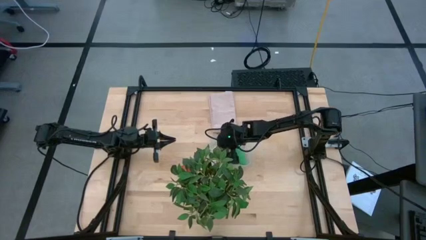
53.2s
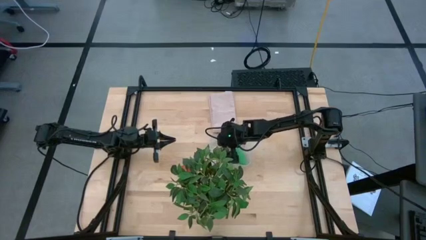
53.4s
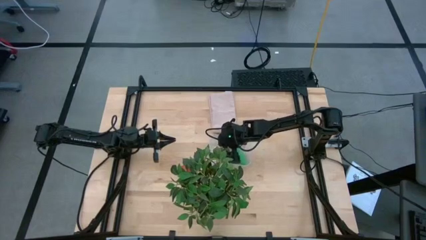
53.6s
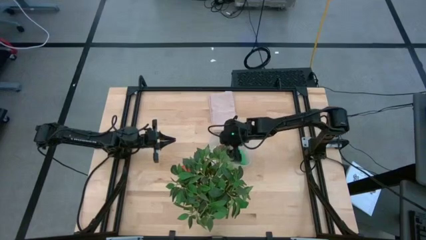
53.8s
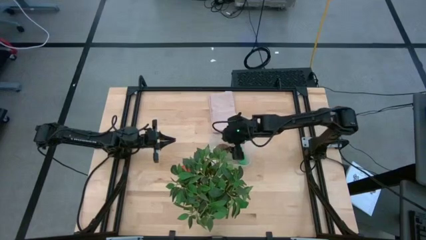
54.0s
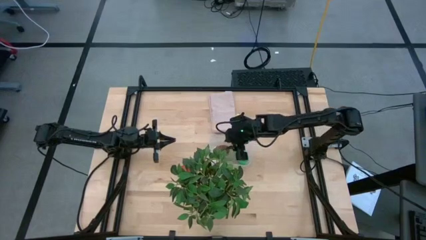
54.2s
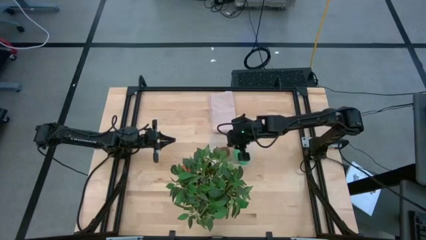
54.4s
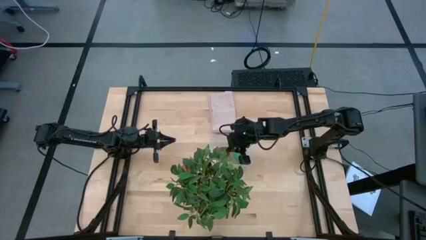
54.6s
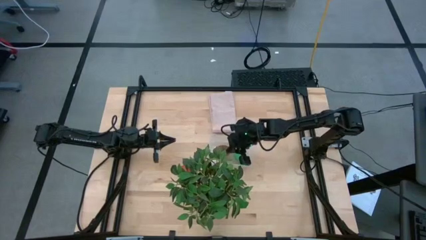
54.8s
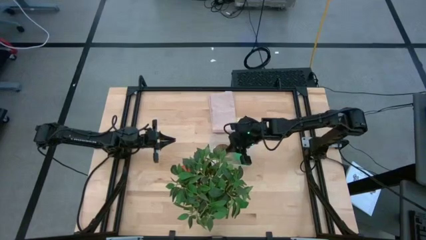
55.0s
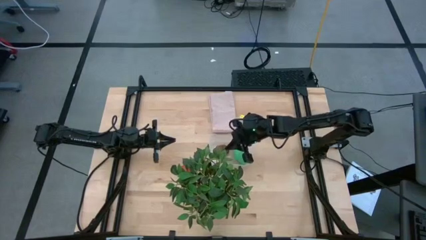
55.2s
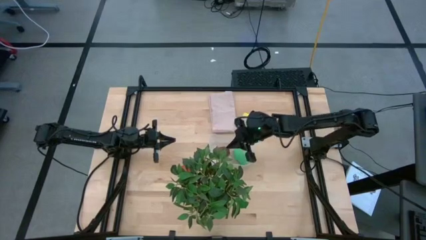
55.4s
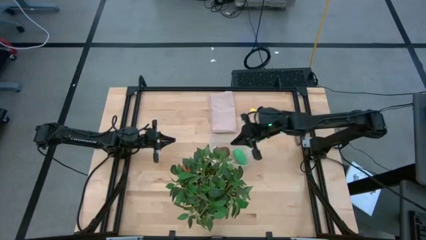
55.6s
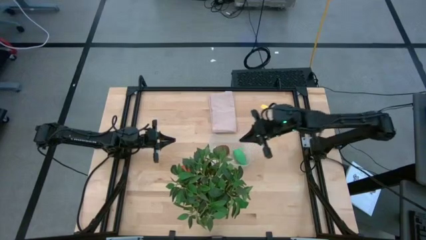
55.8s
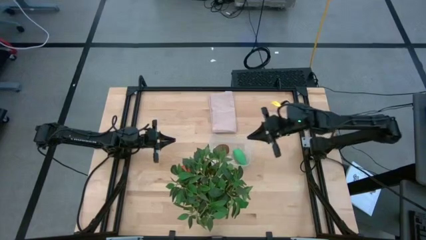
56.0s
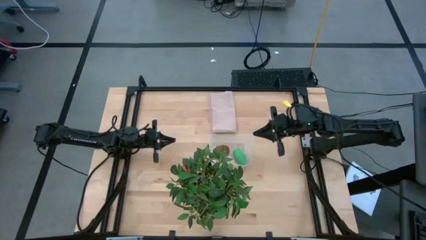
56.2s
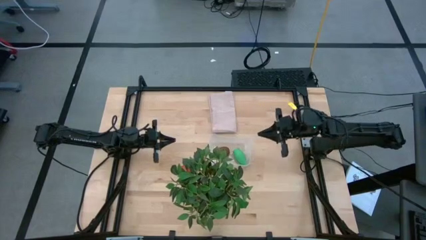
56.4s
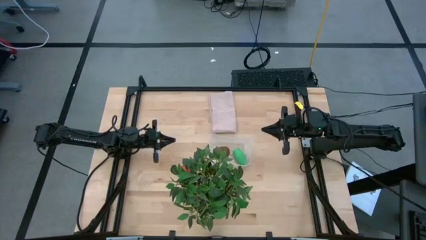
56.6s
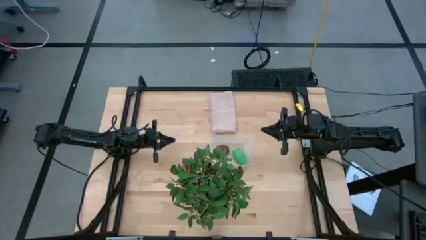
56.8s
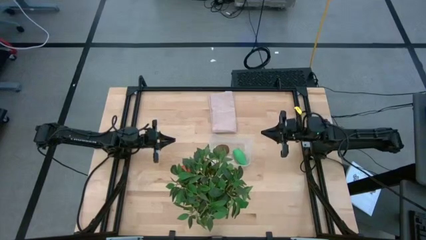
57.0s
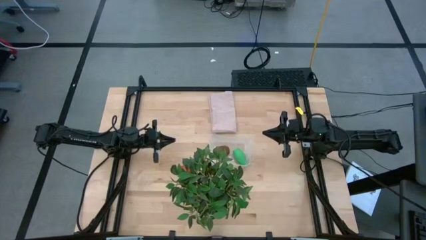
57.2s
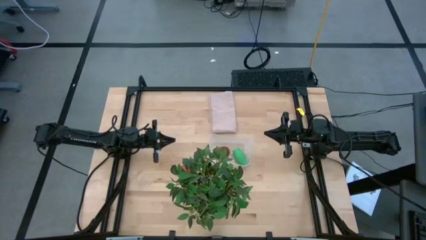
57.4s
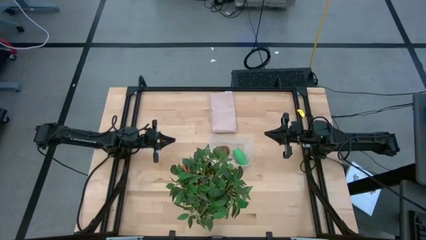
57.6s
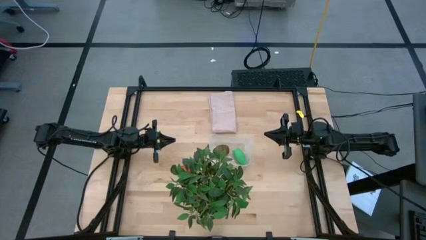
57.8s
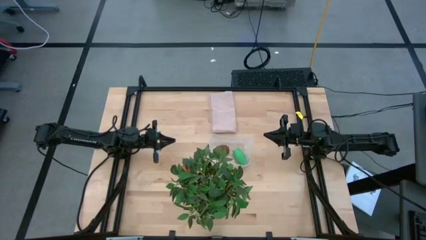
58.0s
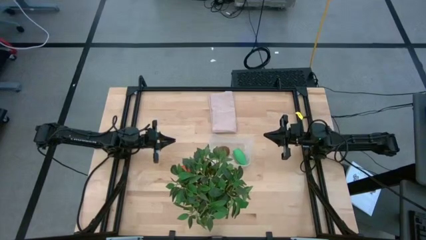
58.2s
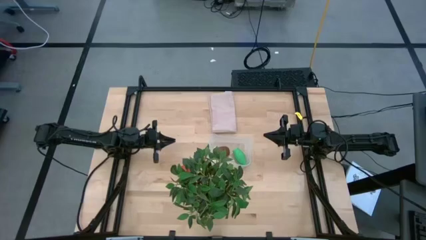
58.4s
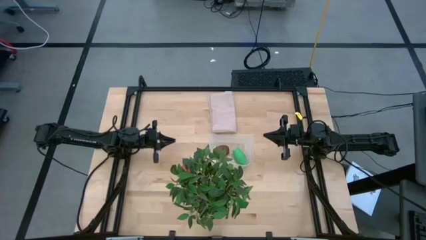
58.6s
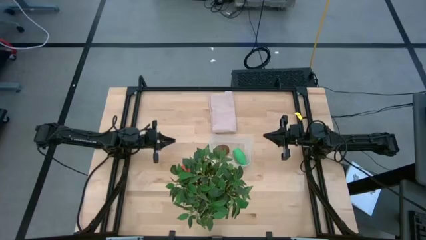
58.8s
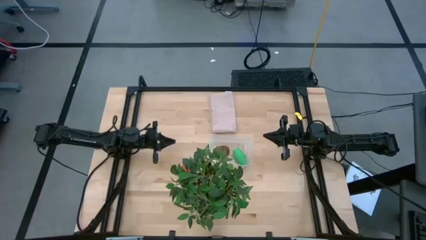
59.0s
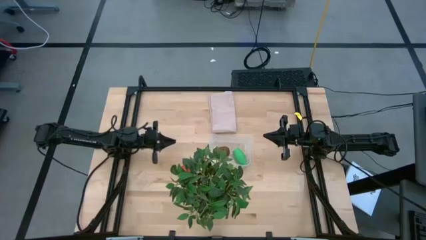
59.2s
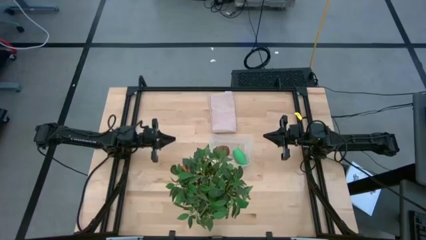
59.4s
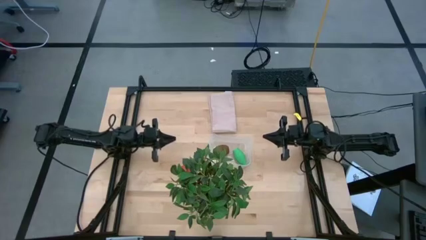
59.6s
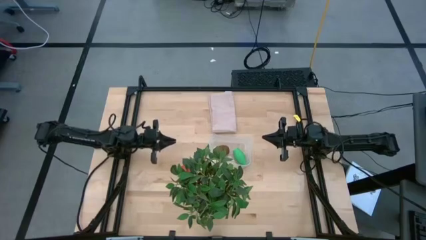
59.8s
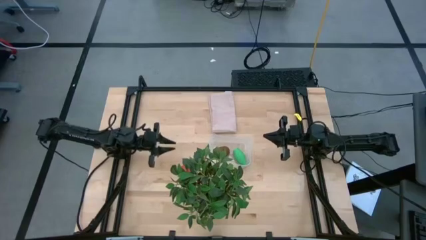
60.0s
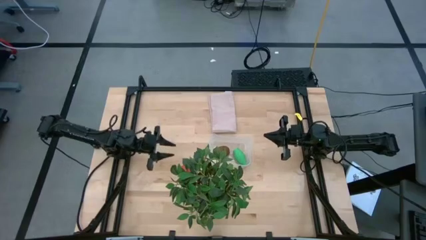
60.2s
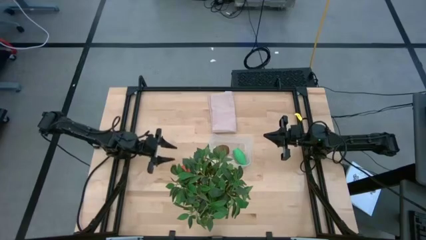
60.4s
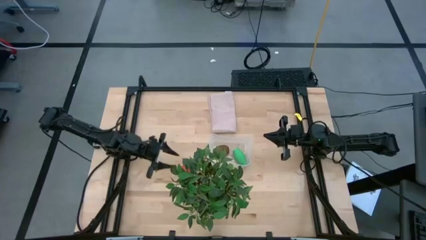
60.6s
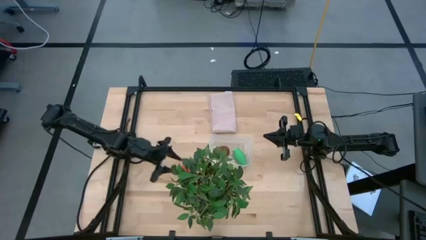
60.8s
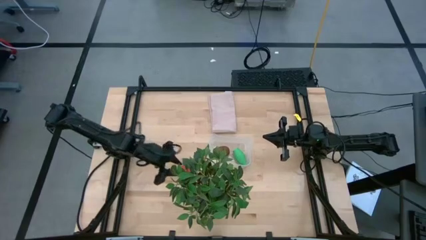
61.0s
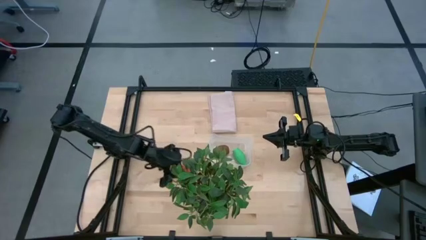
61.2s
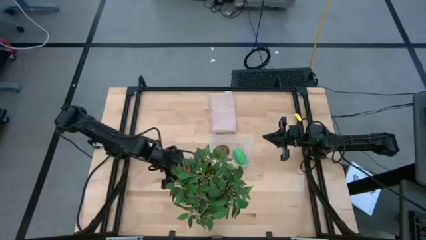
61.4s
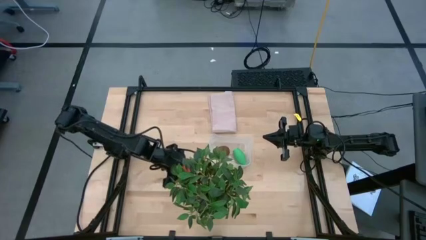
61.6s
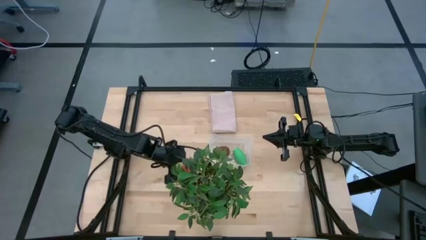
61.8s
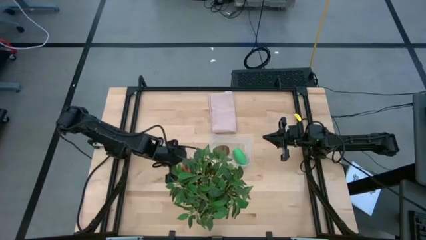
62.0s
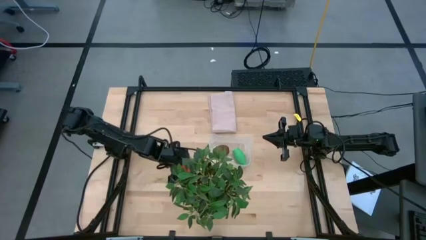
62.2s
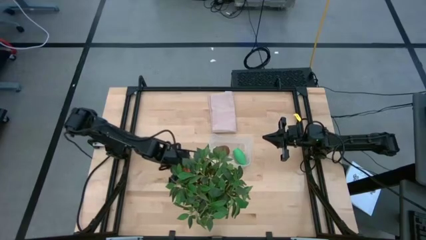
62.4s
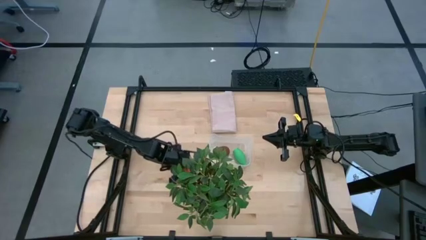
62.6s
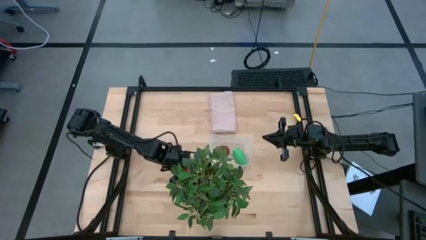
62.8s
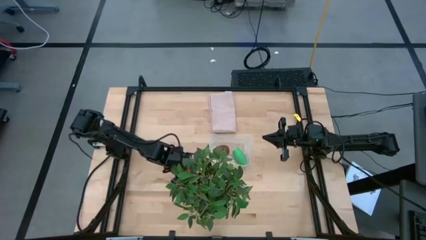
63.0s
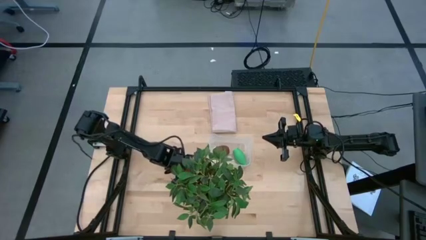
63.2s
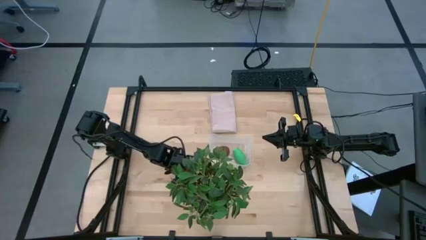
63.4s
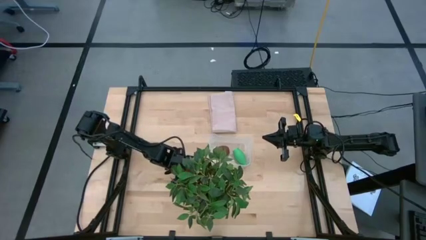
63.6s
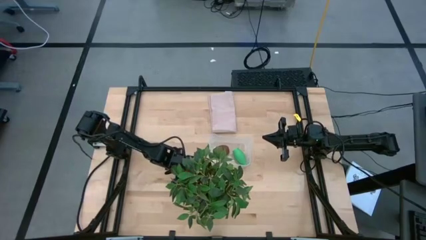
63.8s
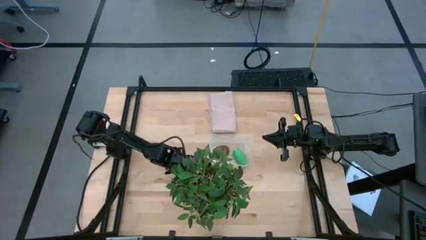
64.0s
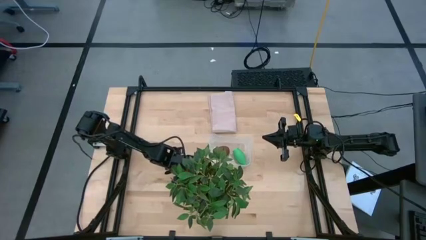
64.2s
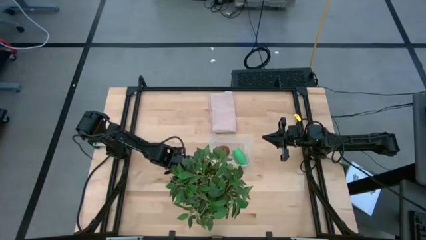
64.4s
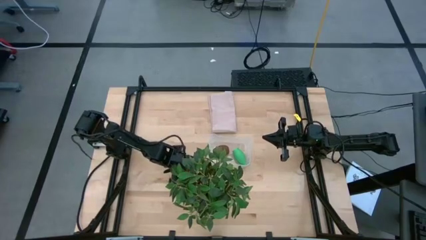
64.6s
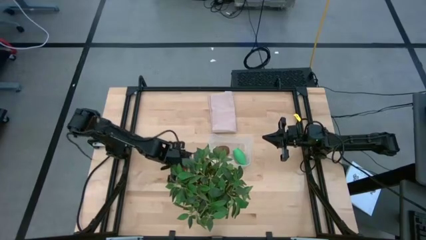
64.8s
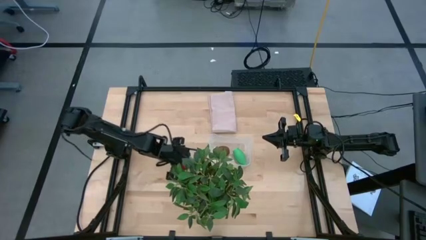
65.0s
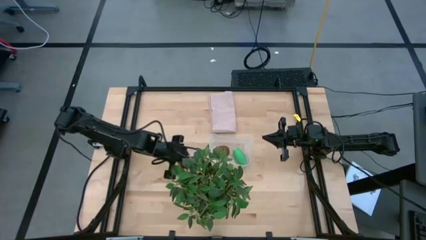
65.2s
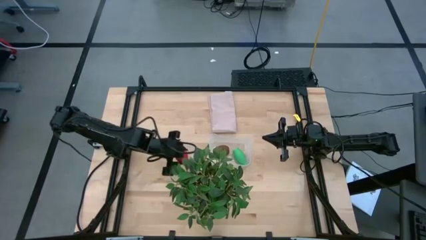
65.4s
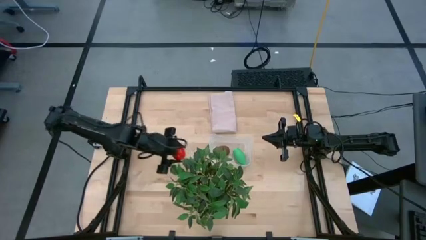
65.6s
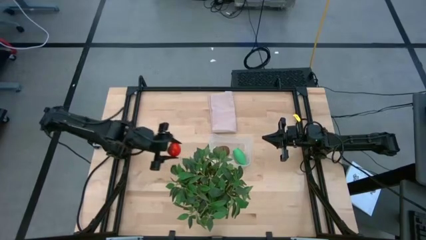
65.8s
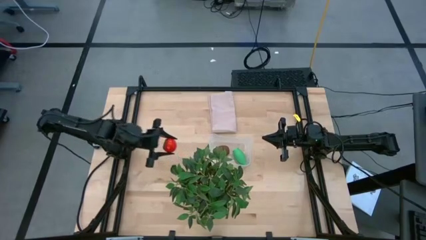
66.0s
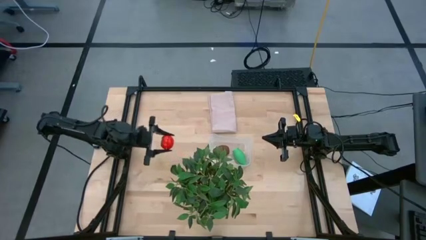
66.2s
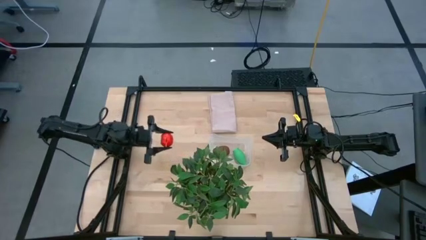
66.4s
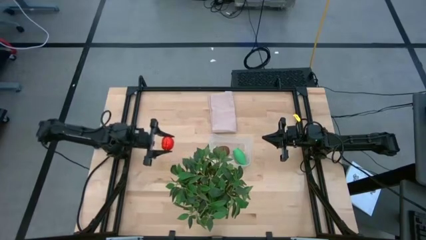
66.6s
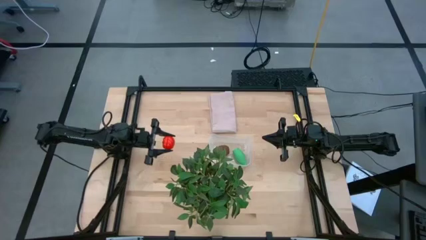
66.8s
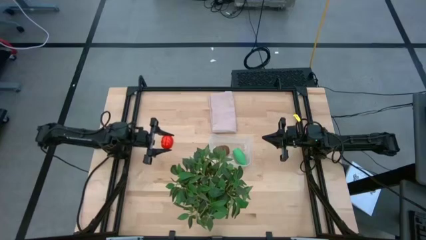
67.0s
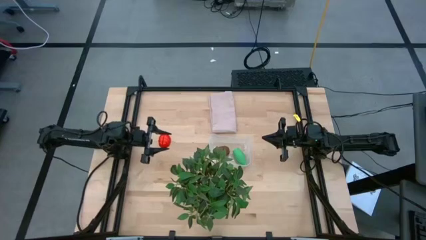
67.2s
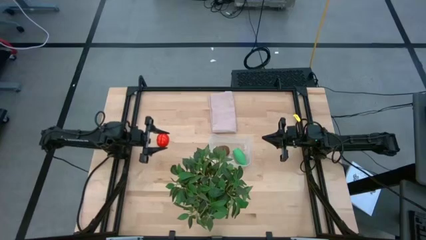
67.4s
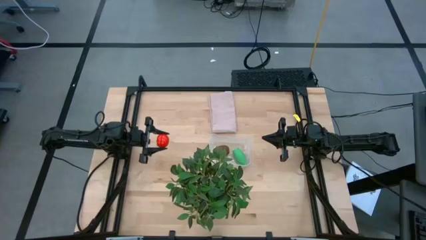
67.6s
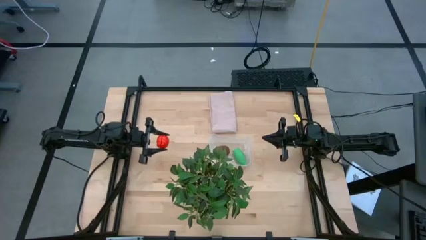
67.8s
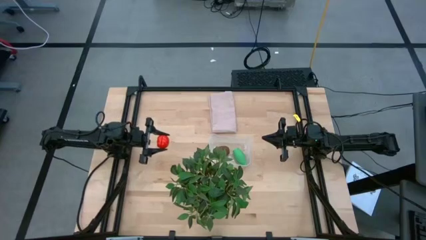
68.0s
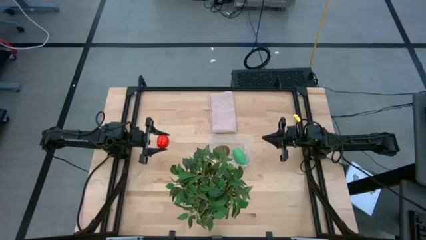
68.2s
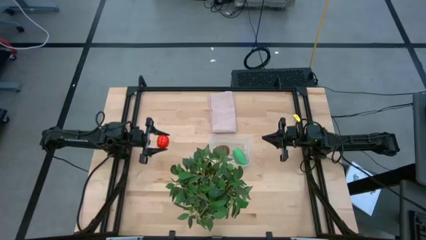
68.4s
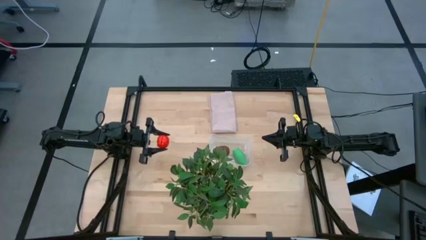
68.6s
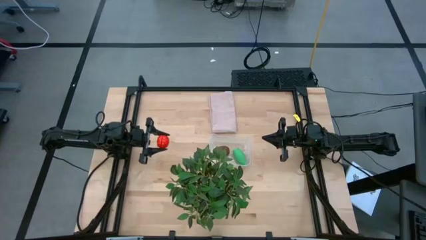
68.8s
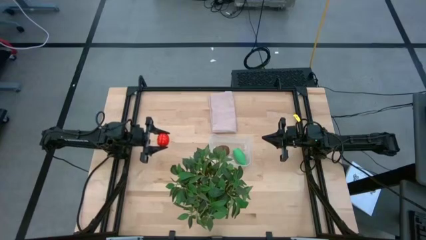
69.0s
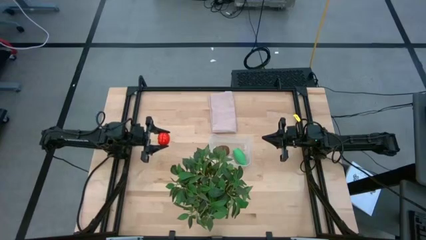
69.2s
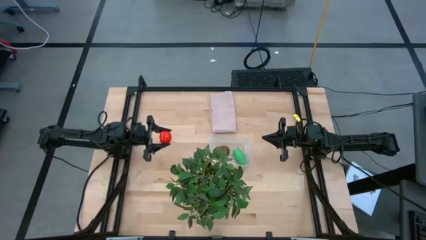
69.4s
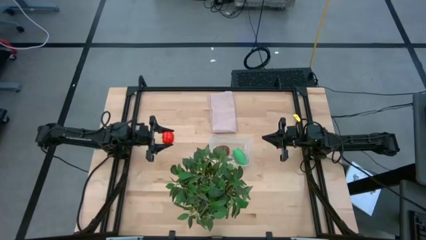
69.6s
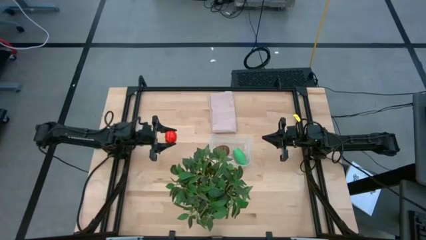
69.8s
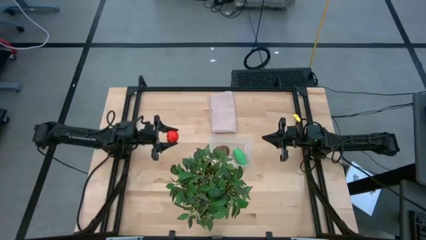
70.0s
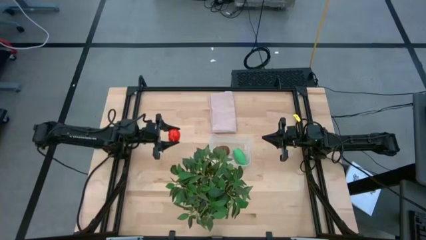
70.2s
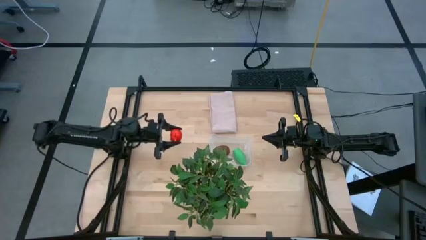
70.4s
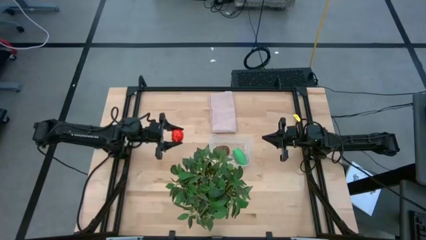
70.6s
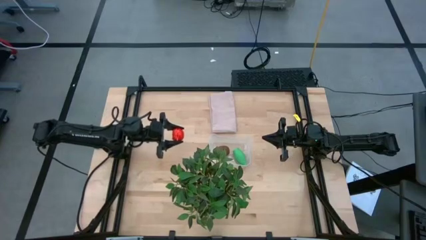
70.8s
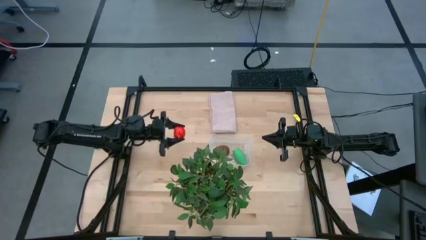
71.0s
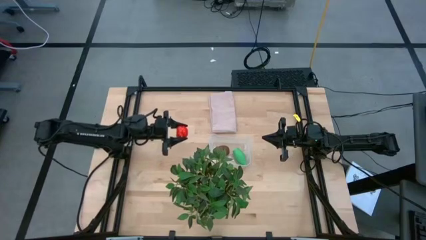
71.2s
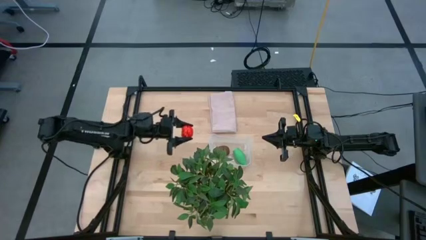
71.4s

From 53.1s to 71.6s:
Task: Pick and placing Produce into tupperware
Put the tomato into the transparent bin
